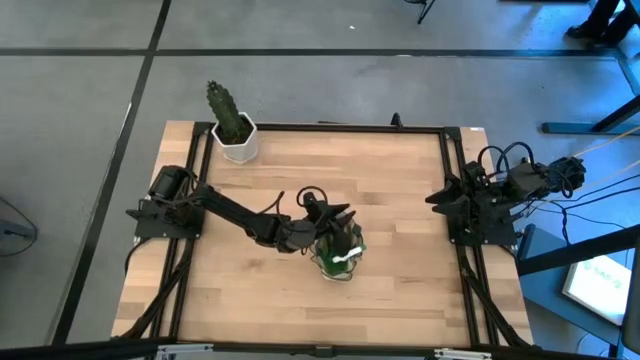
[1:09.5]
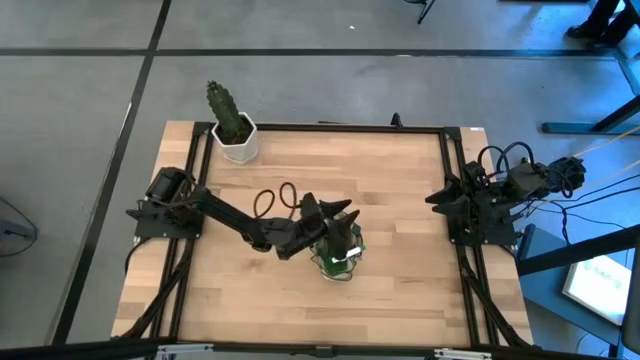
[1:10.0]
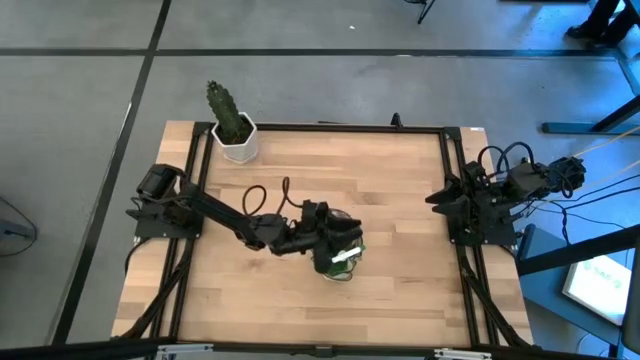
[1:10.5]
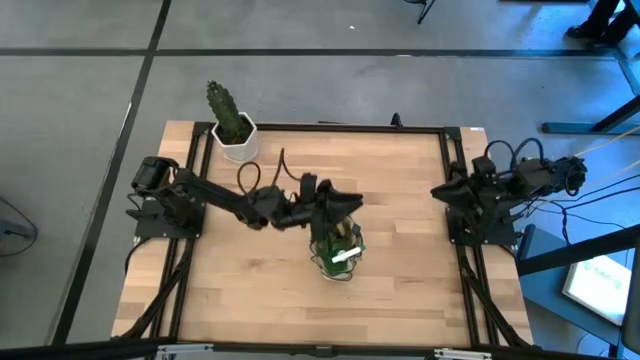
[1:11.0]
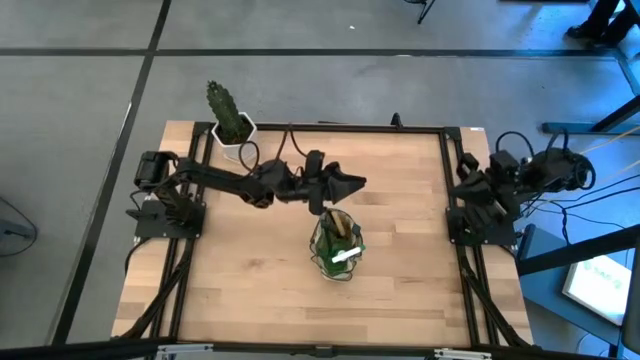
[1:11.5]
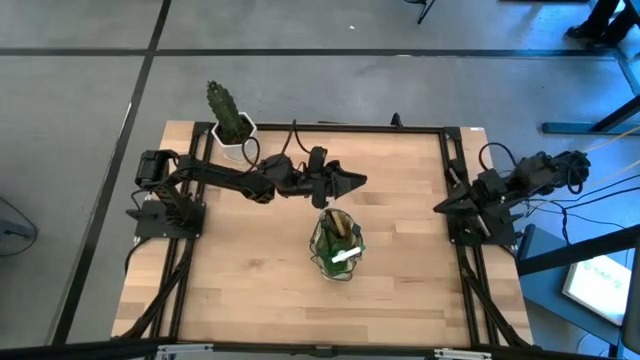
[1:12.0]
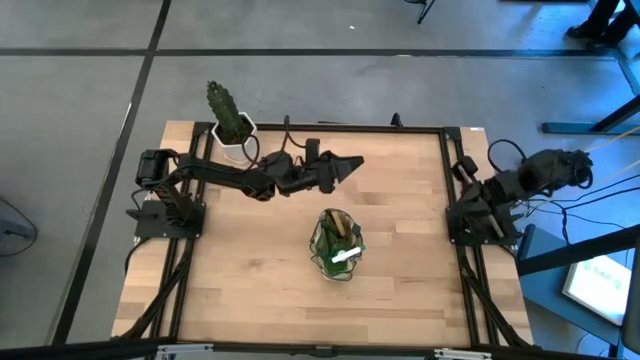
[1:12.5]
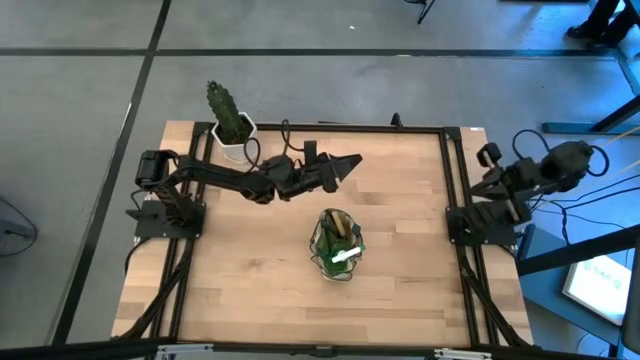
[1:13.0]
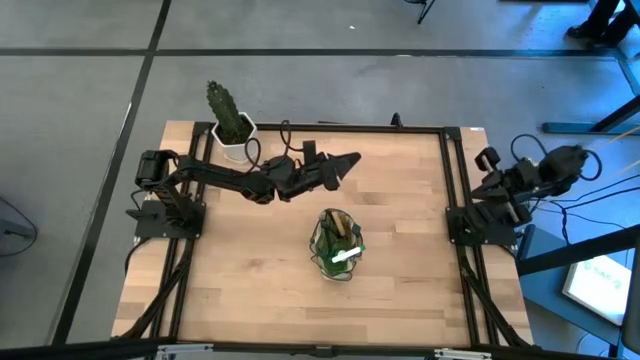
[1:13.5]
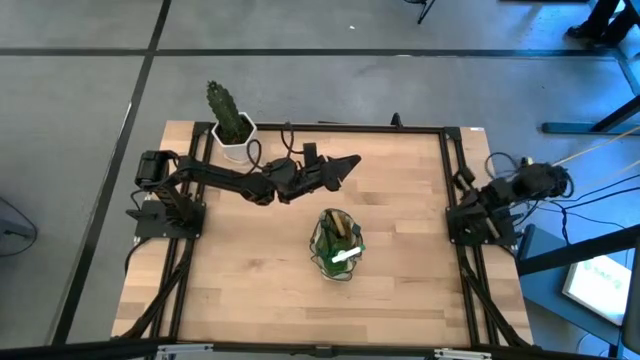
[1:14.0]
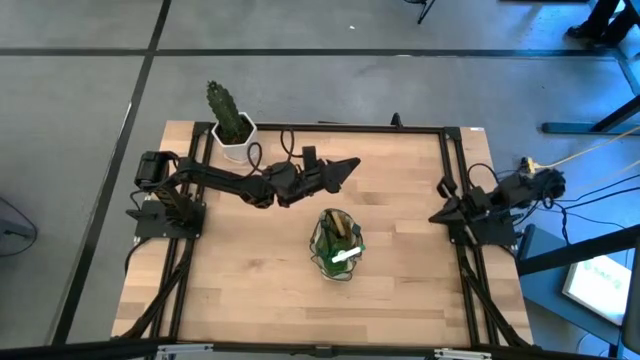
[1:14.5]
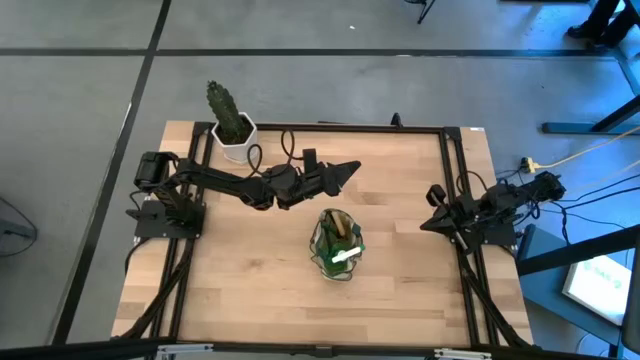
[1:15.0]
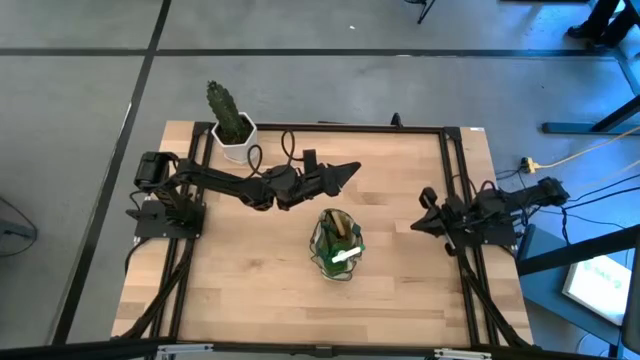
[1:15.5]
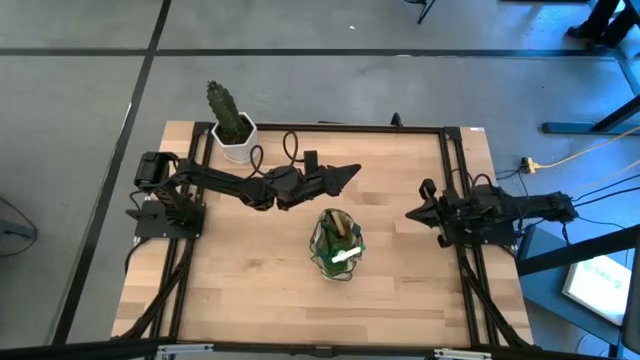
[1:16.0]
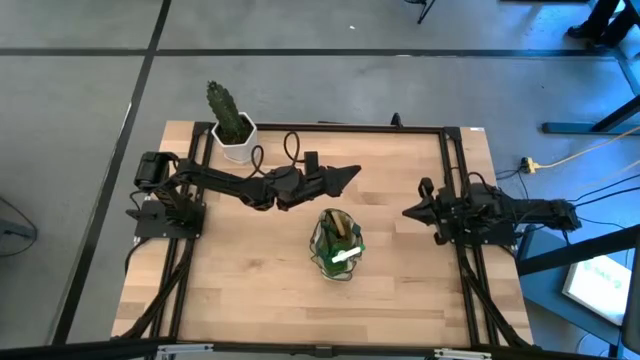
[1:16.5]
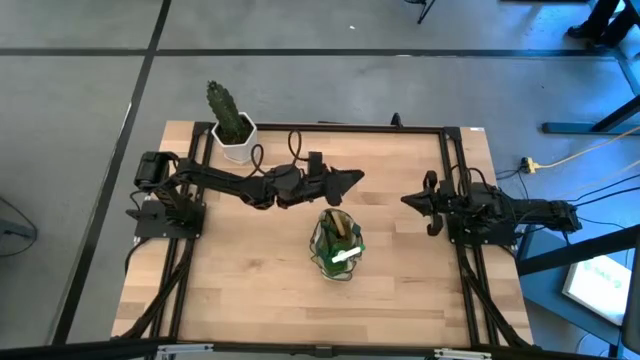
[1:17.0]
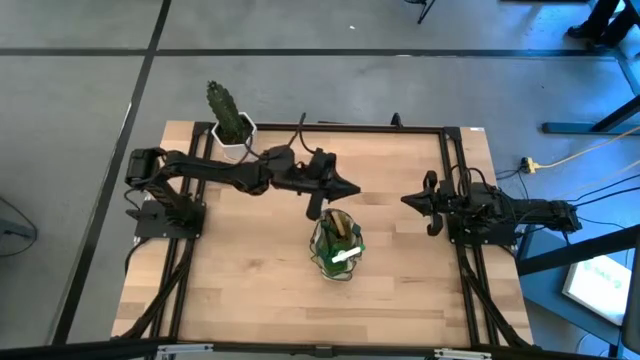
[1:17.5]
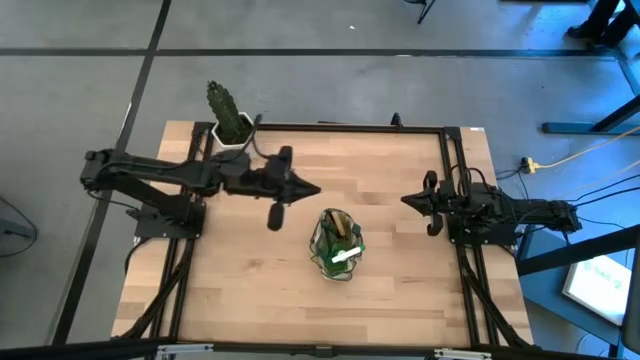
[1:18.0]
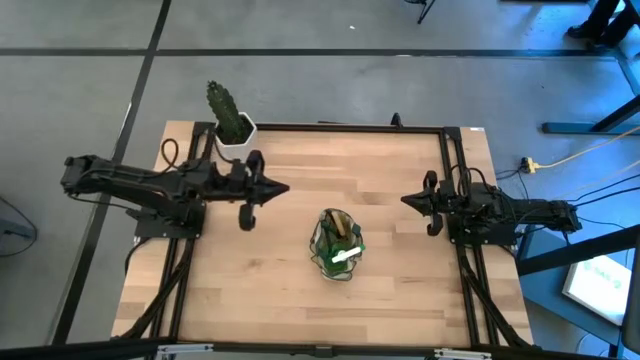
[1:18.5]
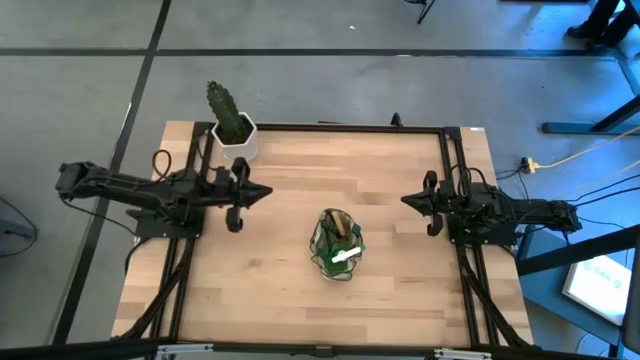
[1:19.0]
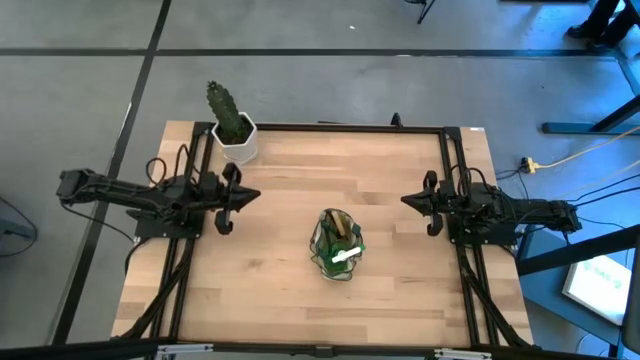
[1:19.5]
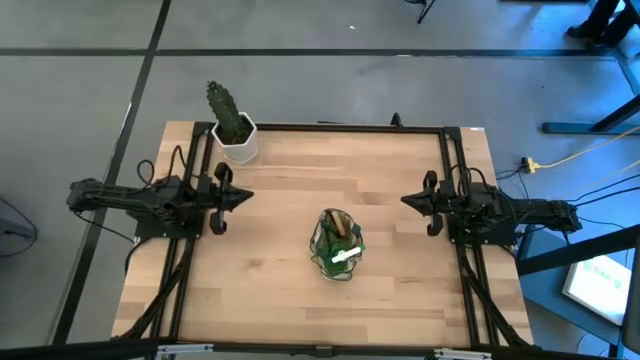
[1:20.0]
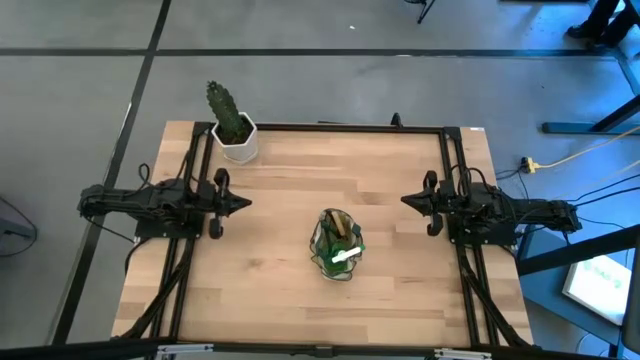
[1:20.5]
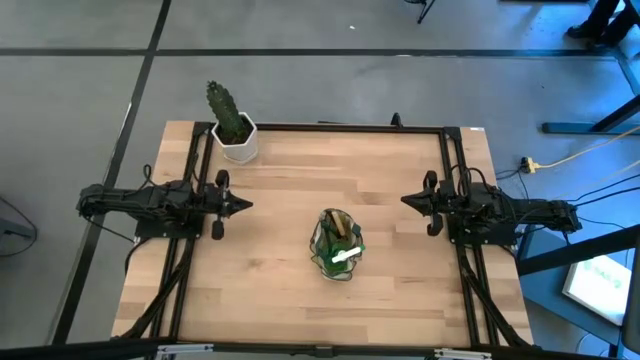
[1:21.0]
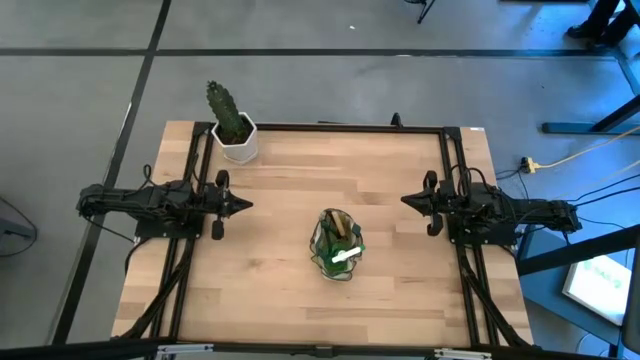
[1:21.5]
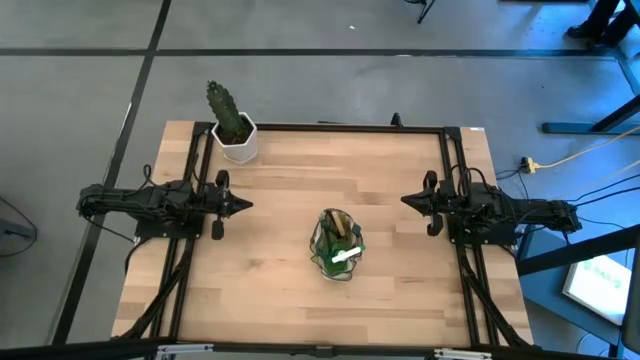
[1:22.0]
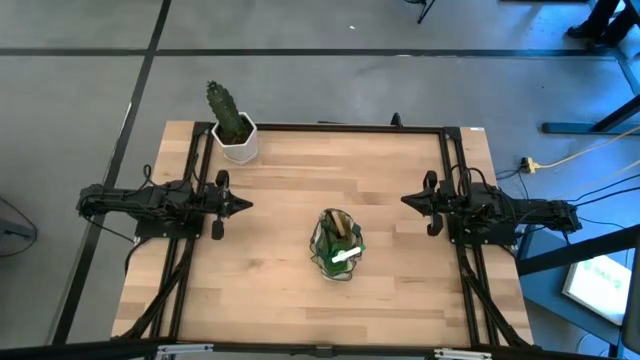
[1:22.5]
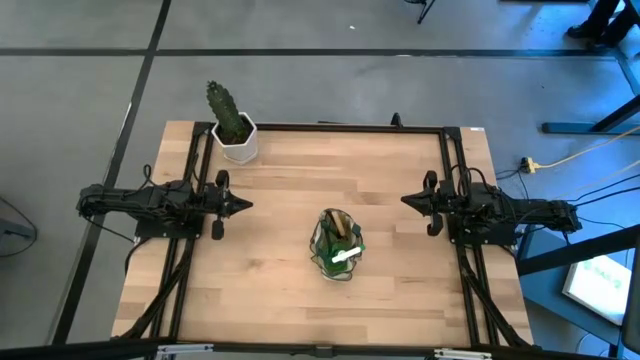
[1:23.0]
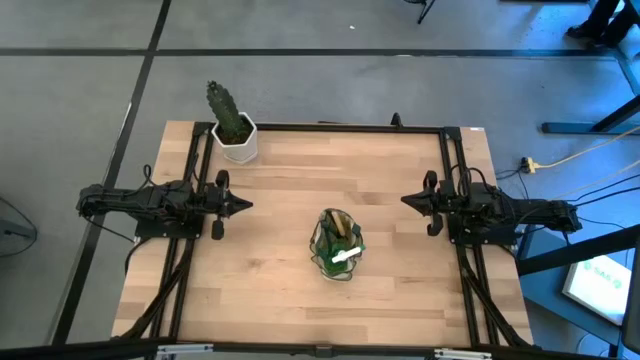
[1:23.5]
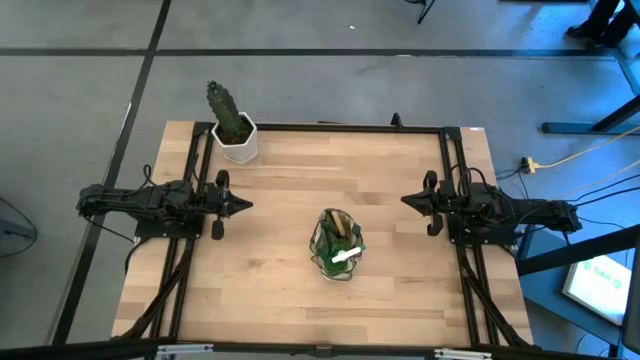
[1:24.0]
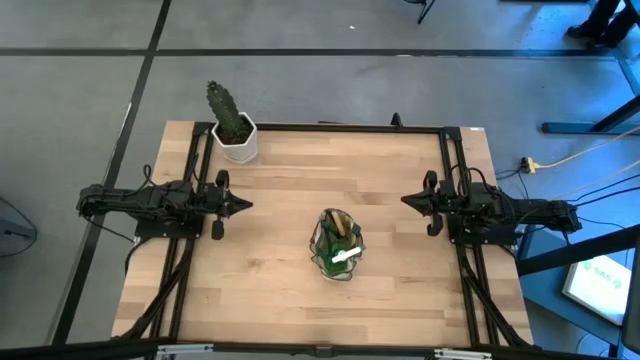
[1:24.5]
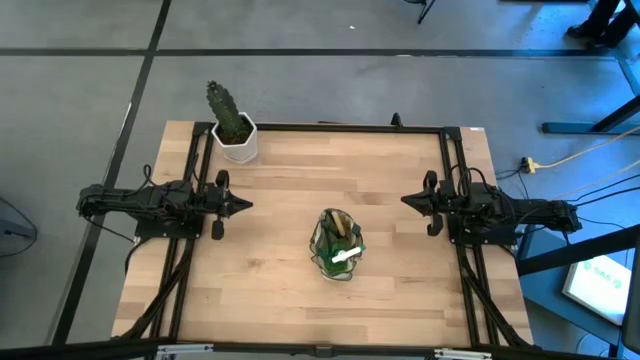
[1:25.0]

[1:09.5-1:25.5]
Task: Pick & Place Garden tools in Gardening bag
Return to Home Position

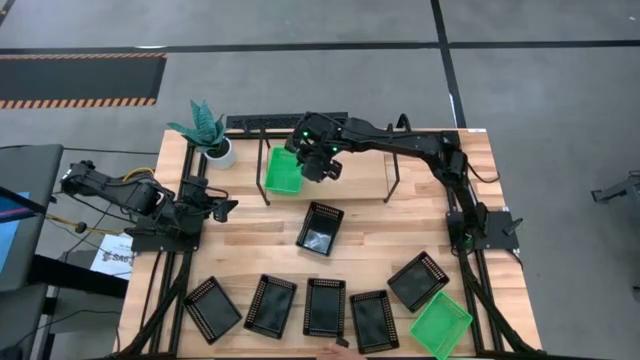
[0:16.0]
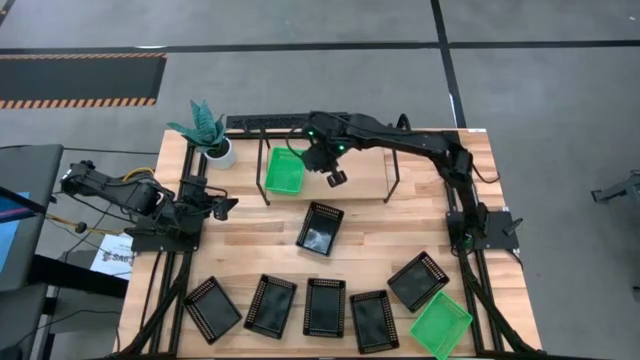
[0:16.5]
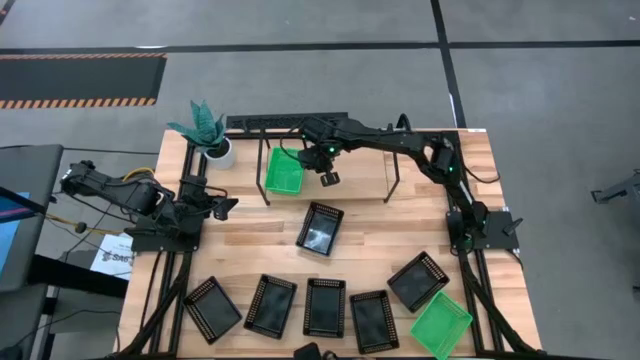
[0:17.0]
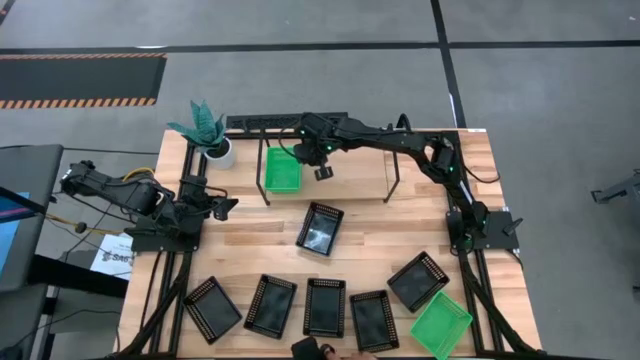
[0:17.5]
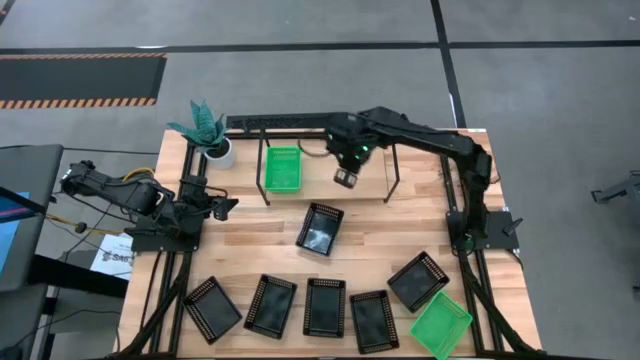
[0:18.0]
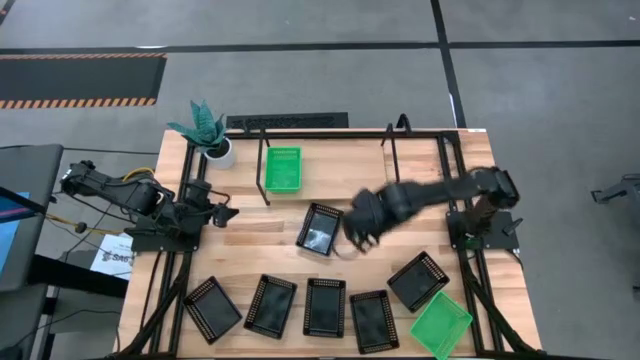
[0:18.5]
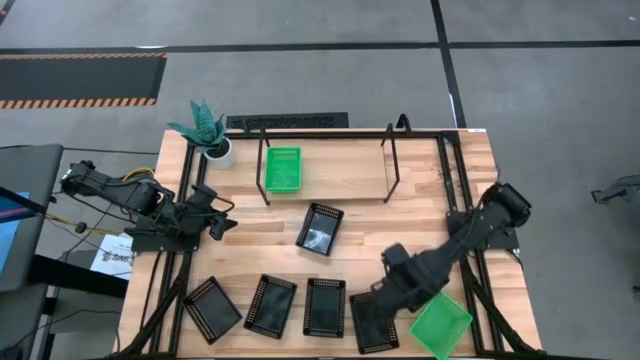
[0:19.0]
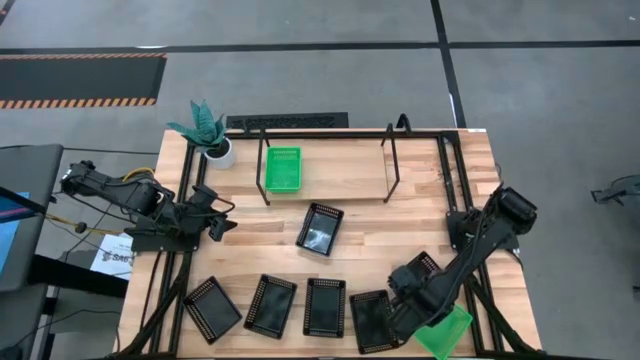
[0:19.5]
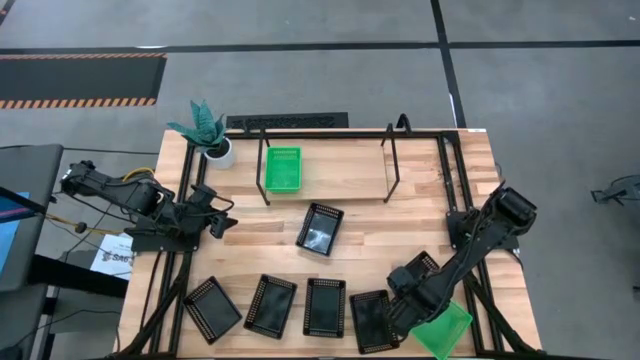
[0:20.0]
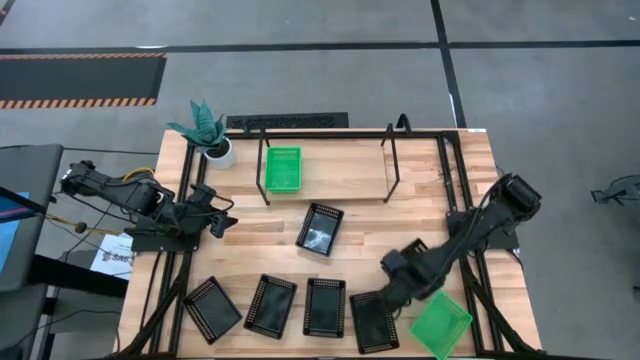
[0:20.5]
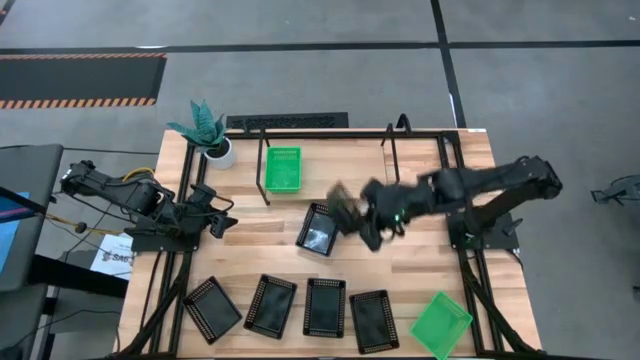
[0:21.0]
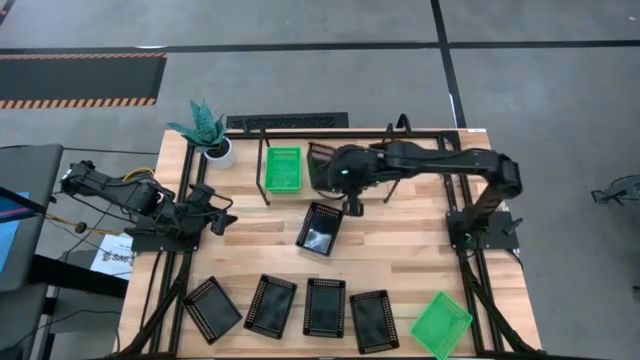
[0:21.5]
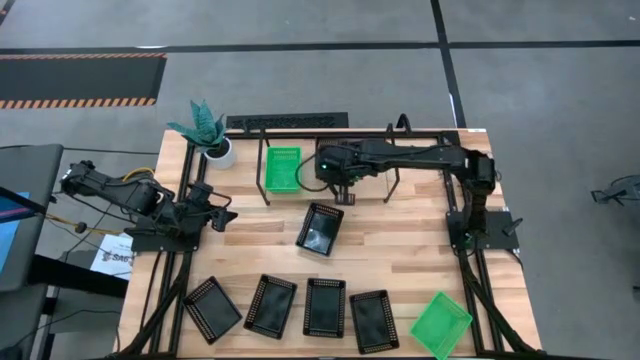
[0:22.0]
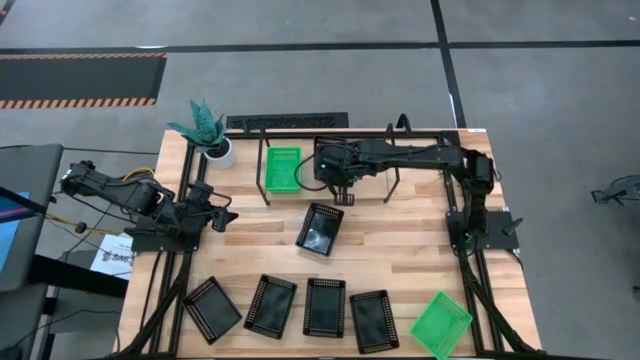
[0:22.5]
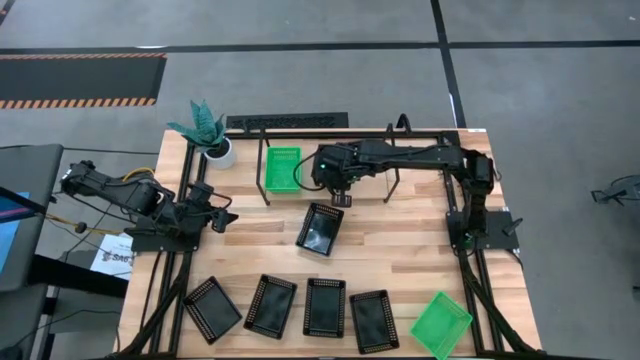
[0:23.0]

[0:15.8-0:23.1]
Task: Stack baskets on shelf by color
Put the black bin on the shelf
